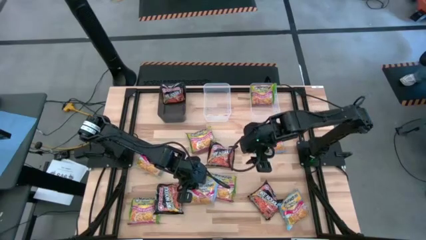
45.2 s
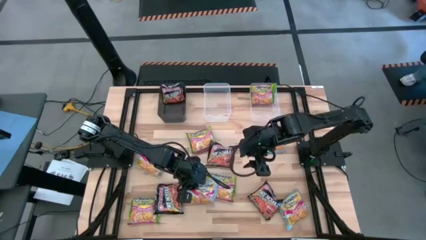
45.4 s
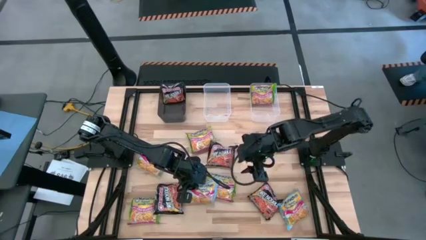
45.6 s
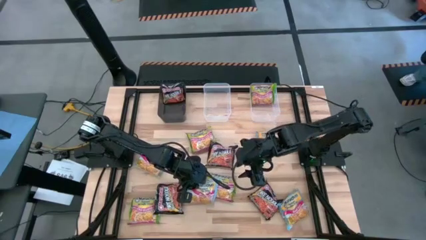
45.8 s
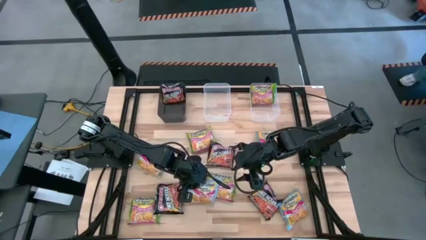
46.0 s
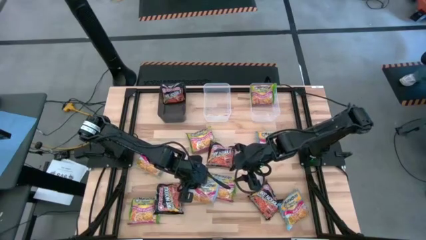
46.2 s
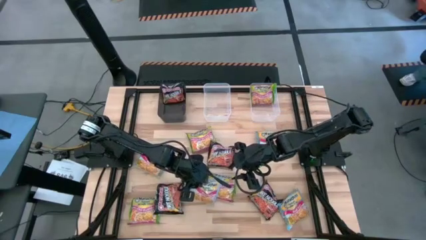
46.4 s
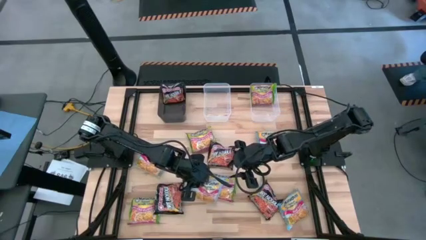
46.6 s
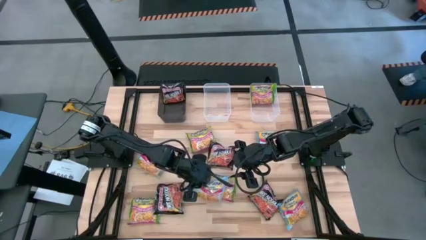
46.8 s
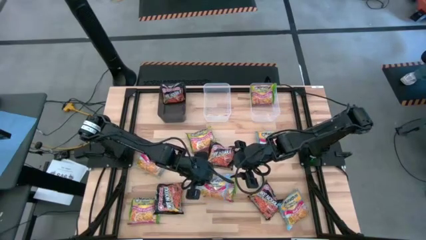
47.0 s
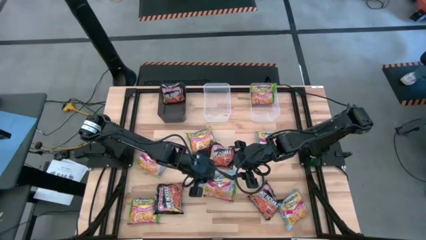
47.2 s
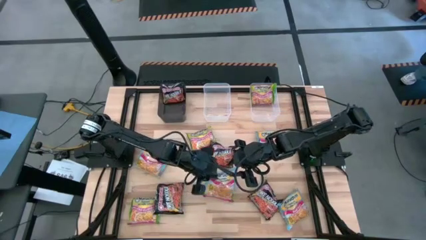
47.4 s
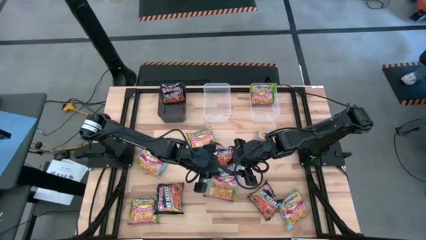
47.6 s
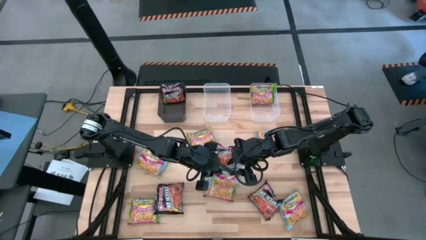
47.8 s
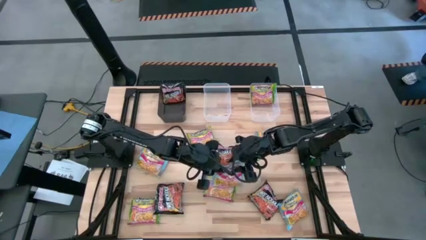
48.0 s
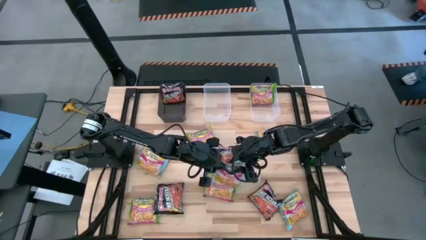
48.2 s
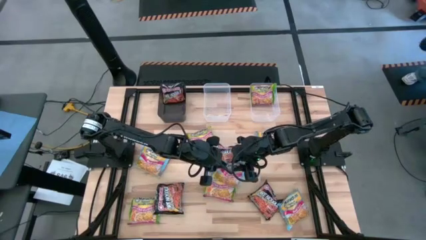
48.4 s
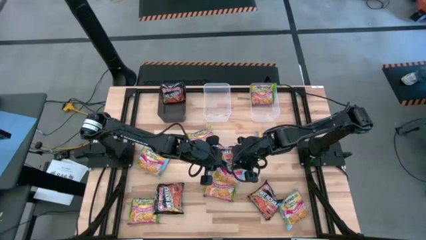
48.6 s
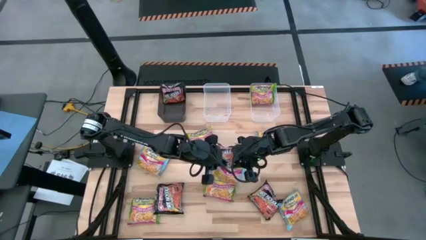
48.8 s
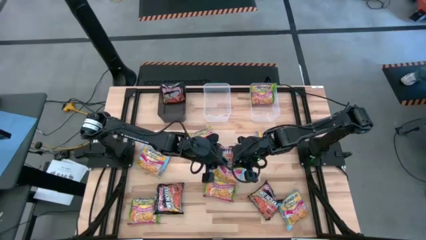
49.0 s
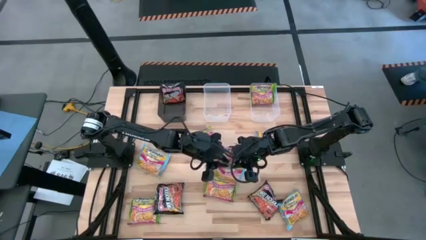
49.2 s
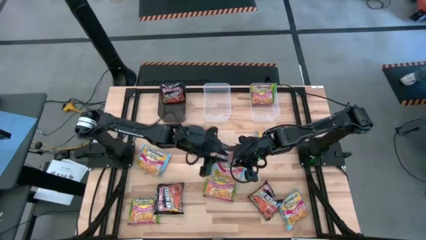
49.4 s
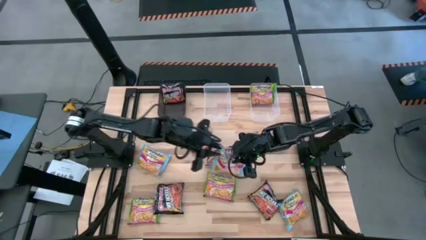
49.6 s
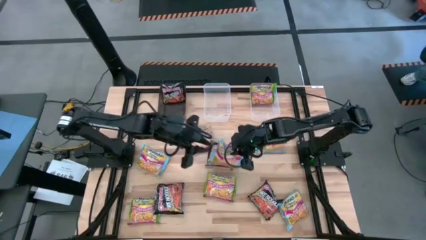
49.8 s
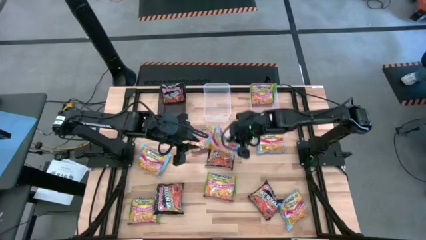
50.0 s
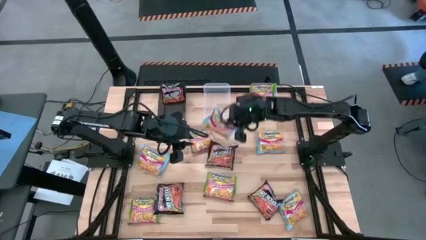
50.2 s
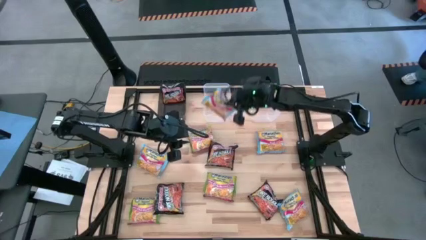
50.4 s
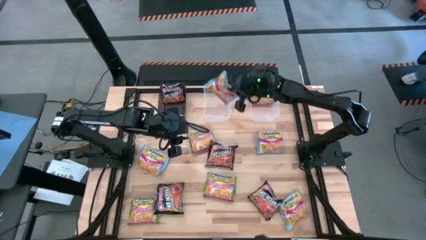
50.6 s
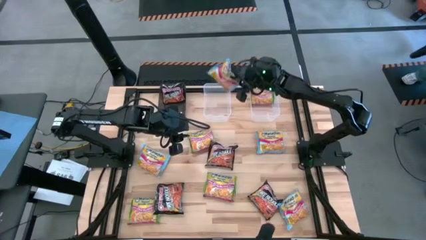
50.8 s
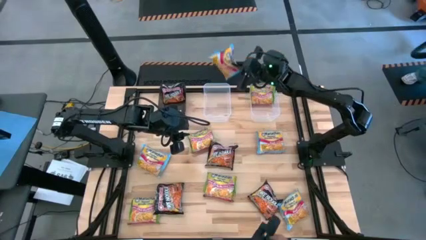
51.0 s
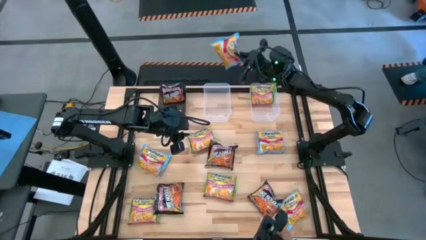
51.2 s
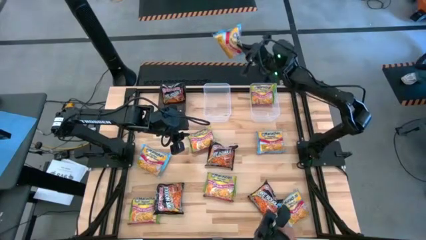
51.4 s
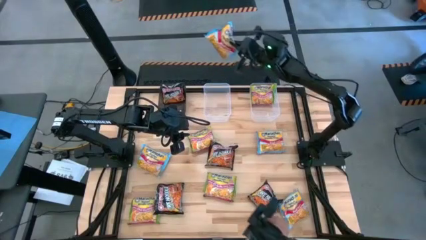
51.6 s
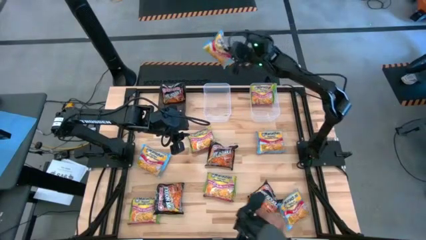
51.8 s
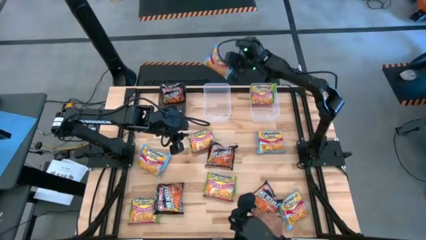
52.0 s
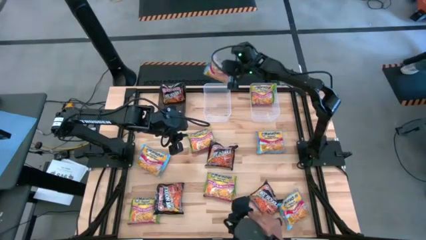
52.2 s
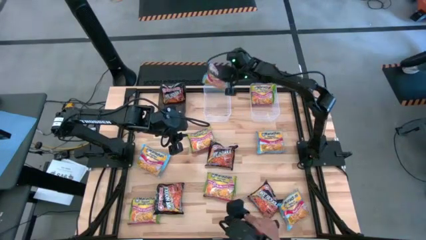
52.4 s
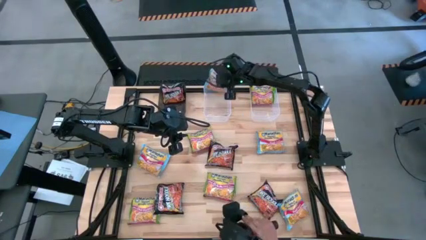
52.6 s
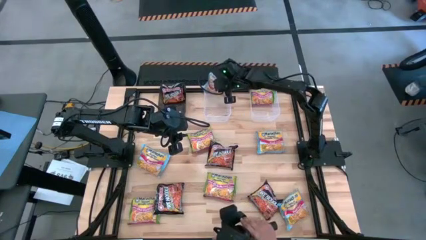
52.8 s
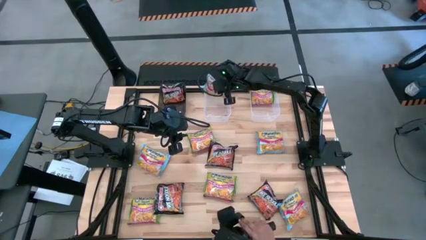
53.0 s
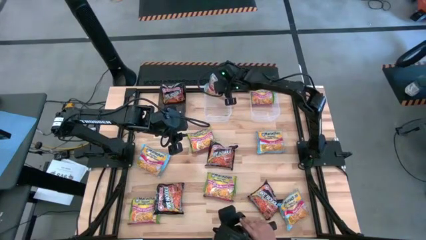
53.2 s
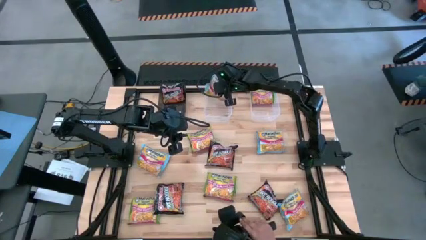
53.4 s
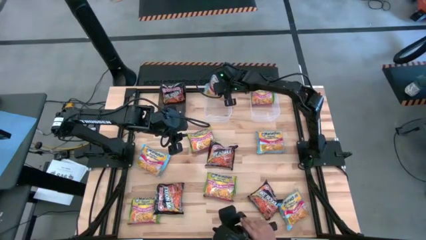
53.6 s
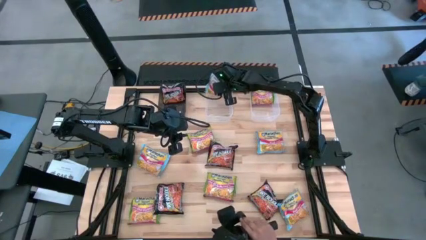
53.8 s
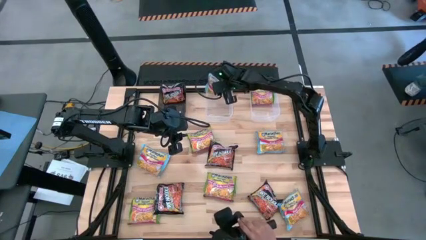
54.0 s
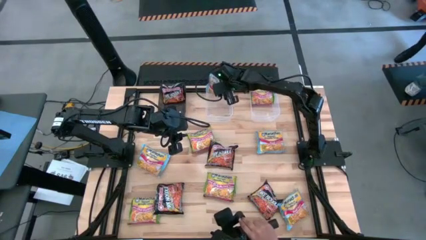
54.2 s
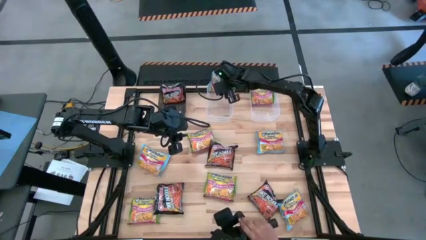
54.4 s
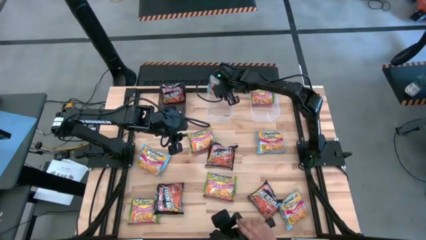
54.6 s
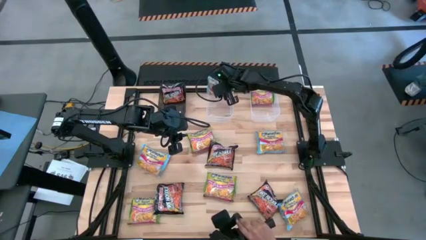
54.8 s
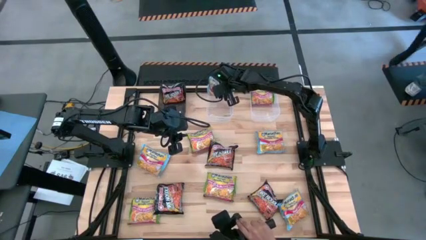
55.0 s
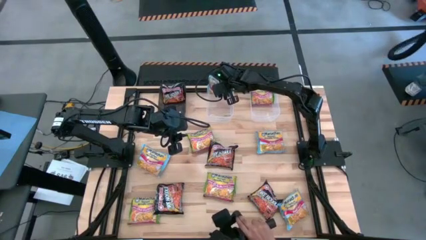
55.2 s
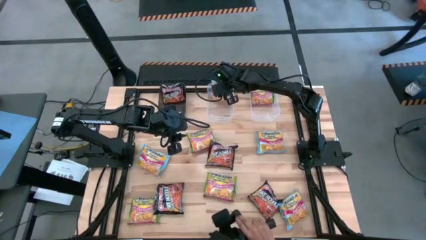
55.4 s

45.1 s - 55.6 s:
Task: Sort Maruchan noodles
Put the bottom middle blue noodle pack into the left transparent bin

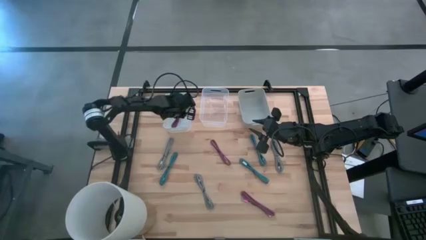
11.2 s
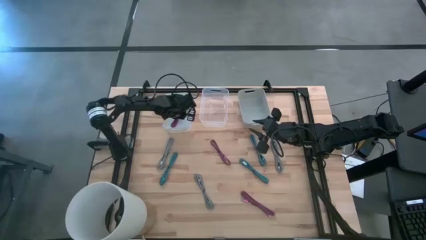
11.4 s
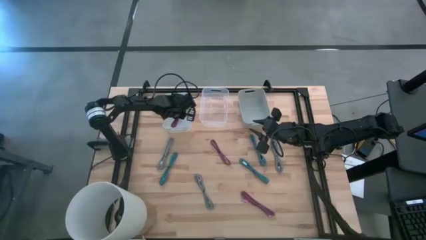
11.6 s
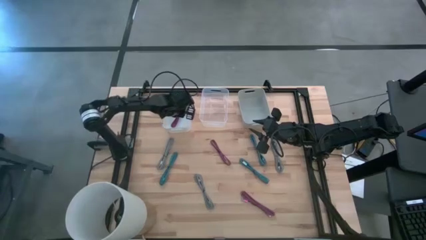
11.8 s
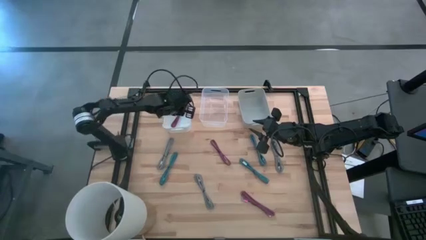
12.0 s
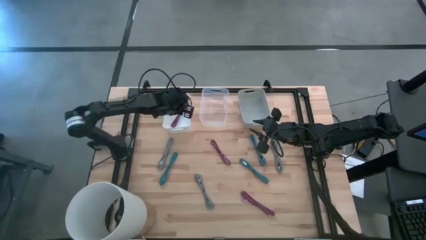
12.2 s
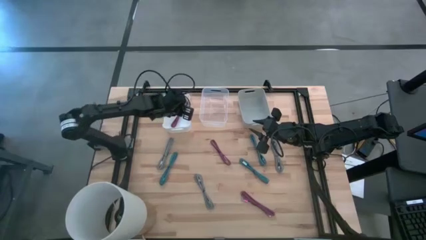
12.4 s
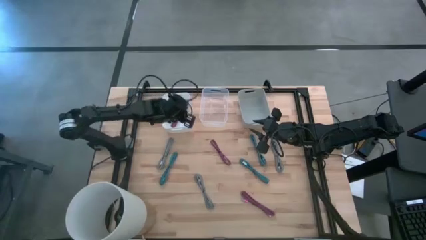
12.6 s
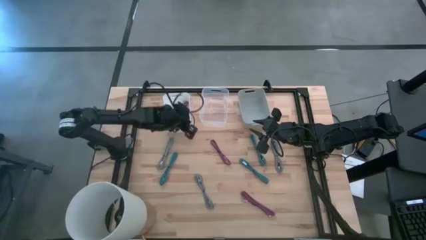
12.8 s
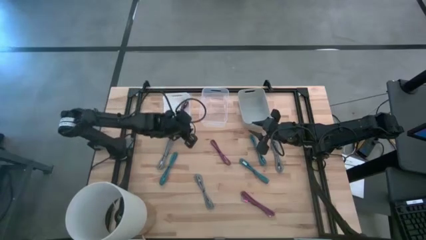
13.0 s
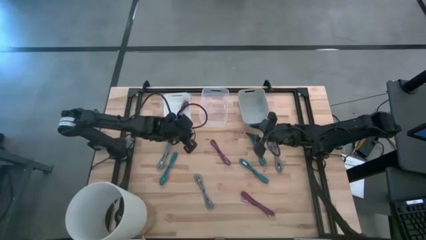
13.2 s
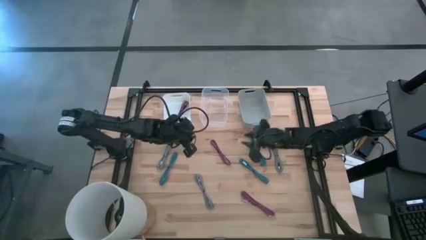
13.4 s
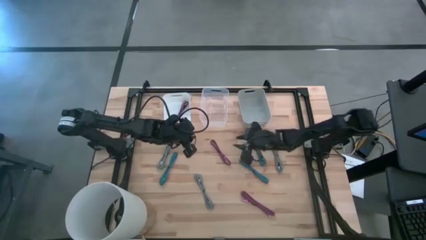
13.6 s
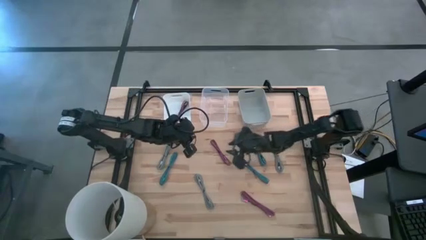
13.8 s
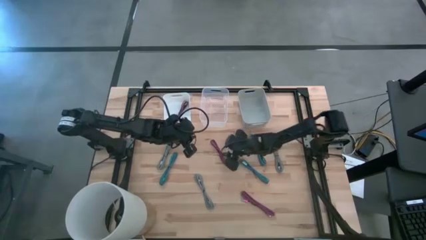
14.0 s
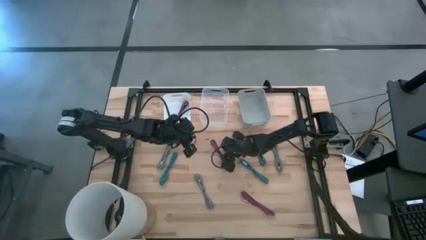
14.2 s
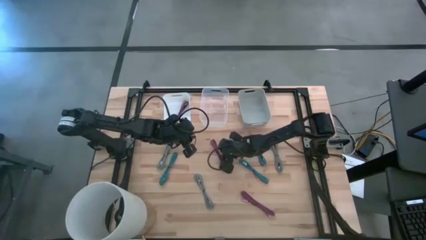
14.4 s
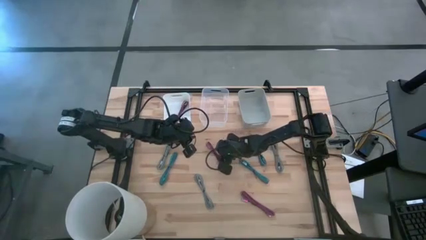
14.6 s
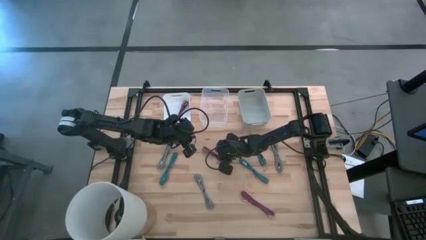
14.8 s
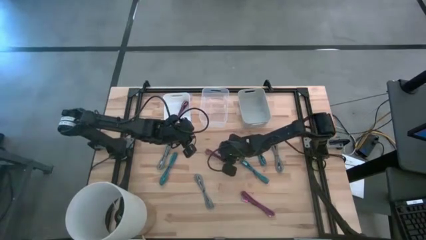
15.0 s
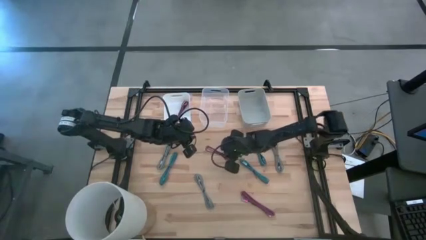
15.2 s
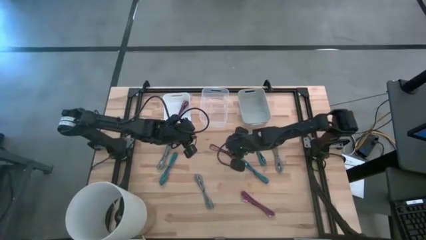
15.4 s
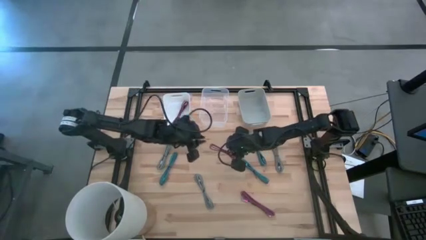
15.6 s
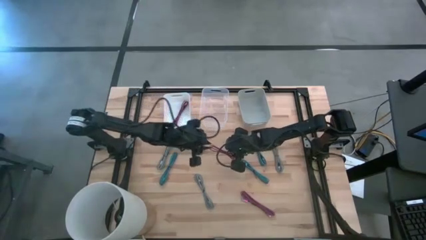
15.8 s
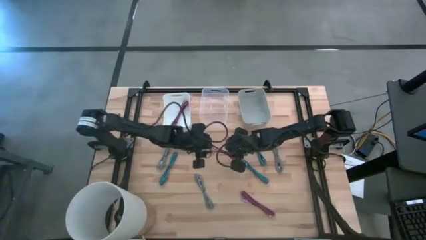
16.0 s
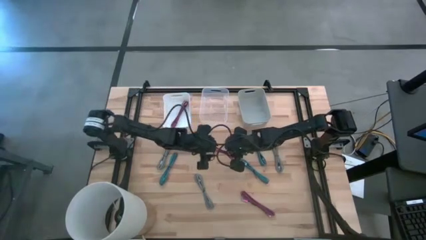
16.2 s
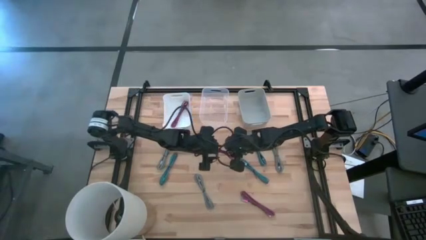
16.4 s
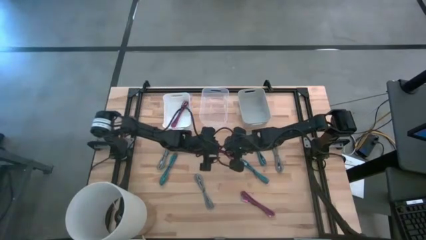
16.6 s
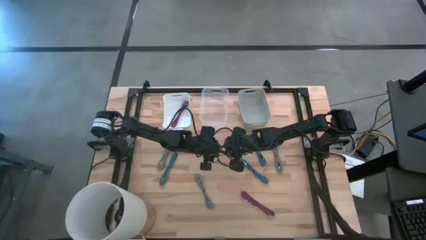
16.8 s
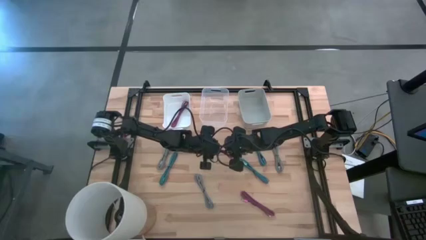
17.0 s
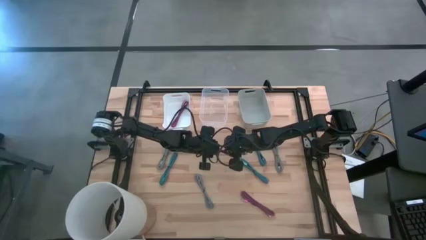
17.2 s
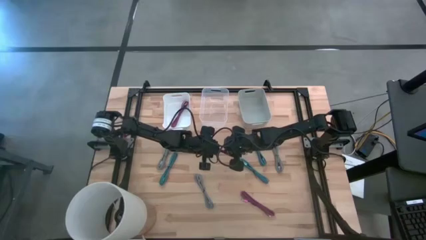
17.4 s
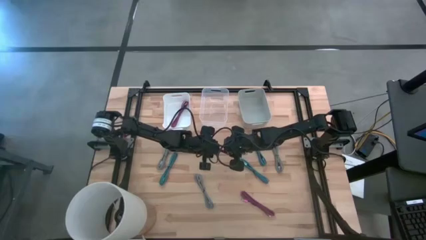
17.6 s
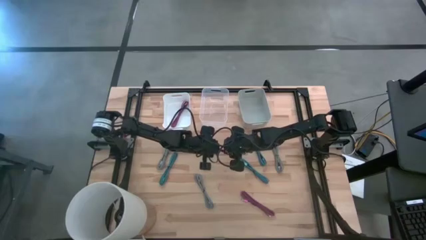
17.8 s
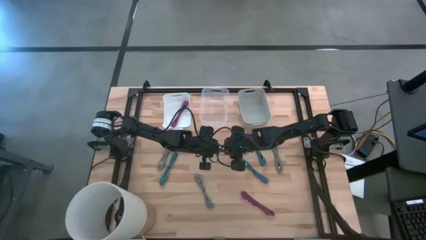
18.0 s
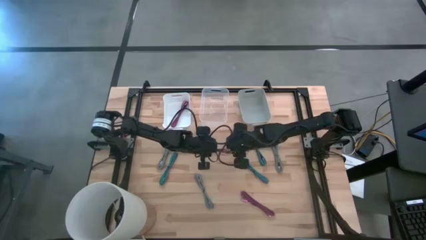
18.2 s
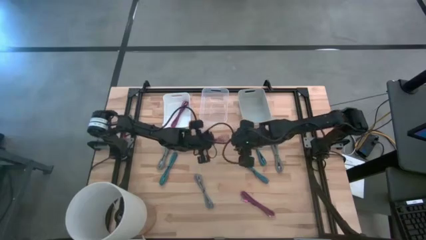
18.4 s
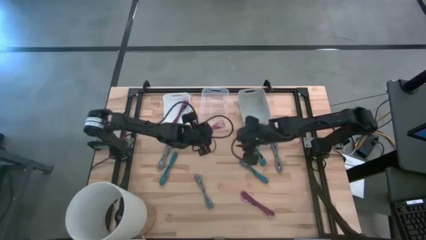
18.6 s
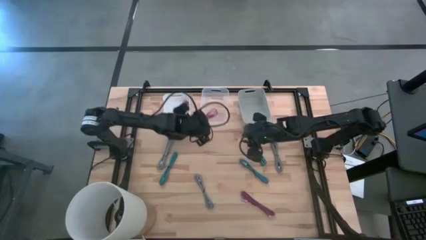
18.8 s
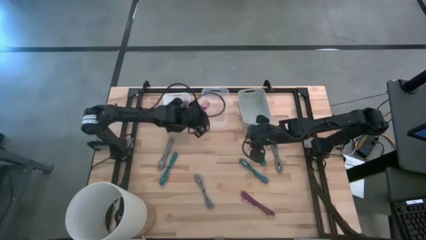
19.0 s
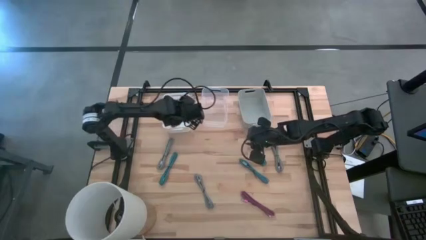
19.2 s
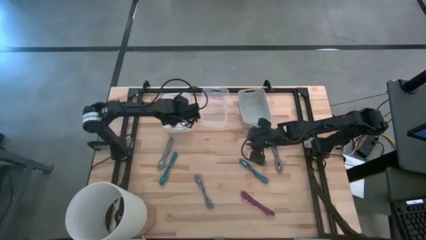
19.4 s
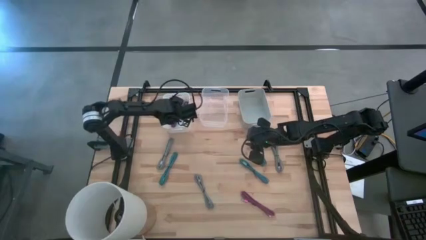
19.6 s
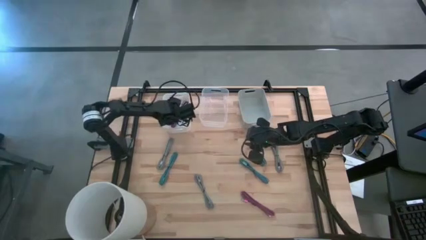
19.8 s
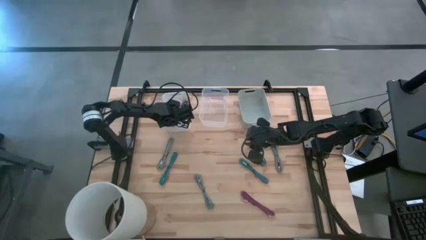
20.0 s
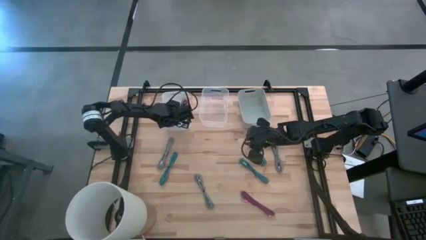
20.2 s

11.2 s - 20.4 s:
Task: Pick & Place USB Port
Put the top pink charger cable into the white bin
